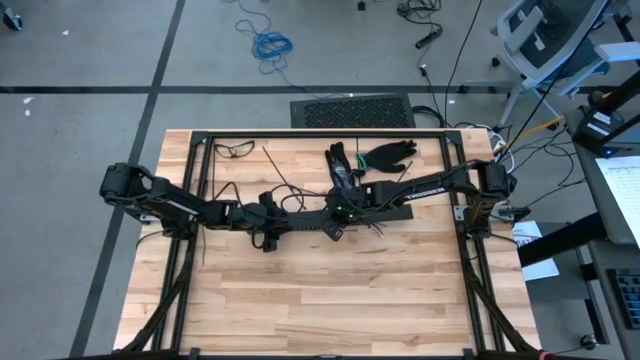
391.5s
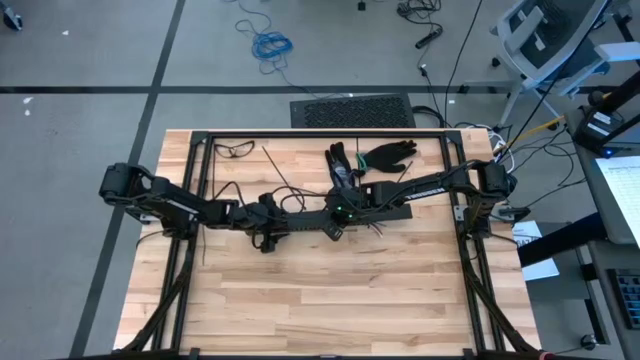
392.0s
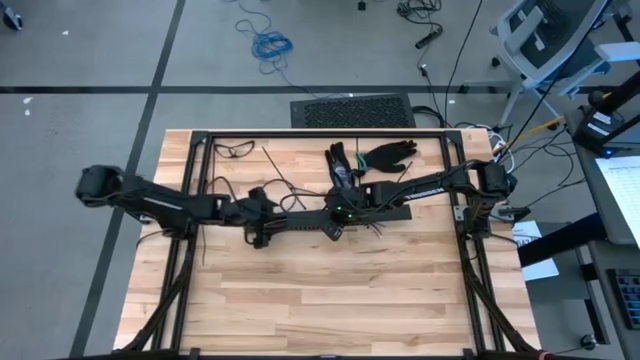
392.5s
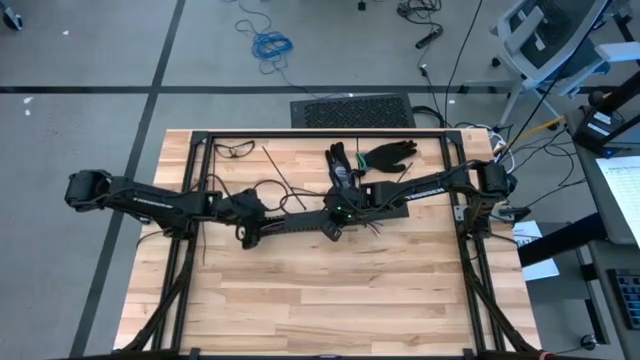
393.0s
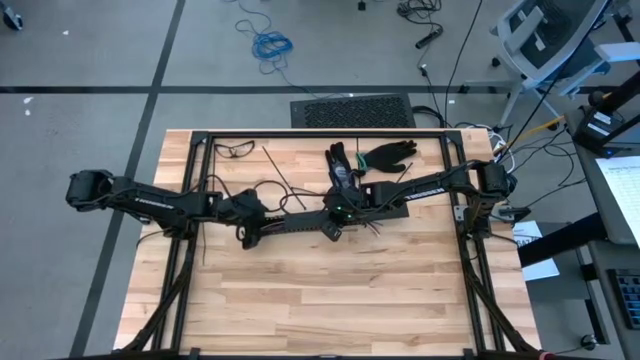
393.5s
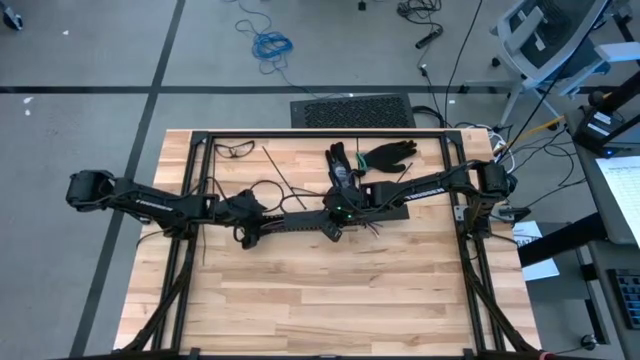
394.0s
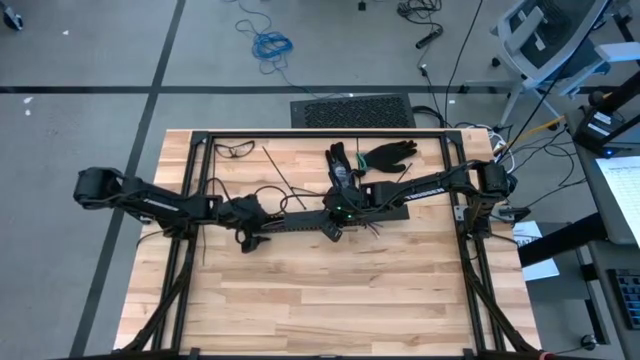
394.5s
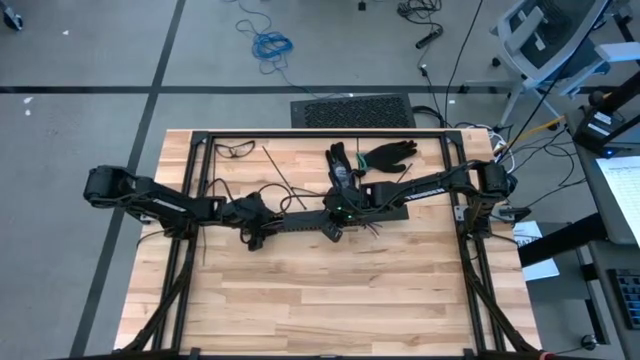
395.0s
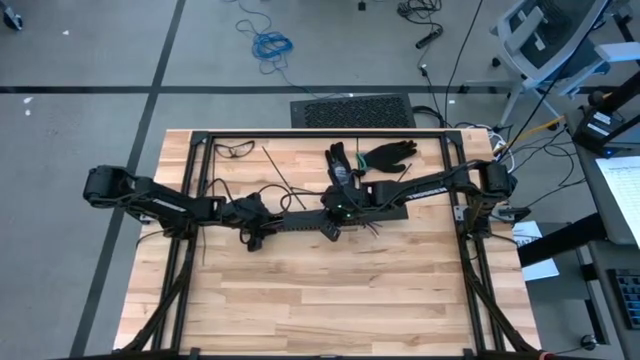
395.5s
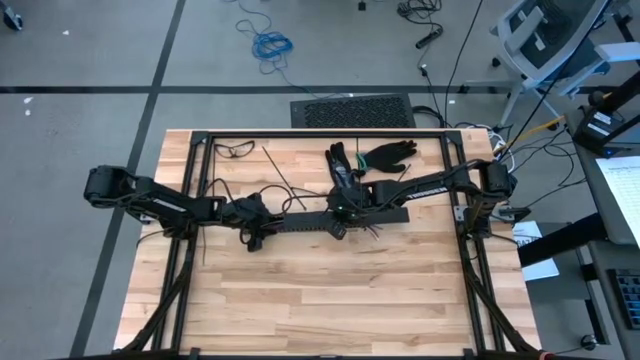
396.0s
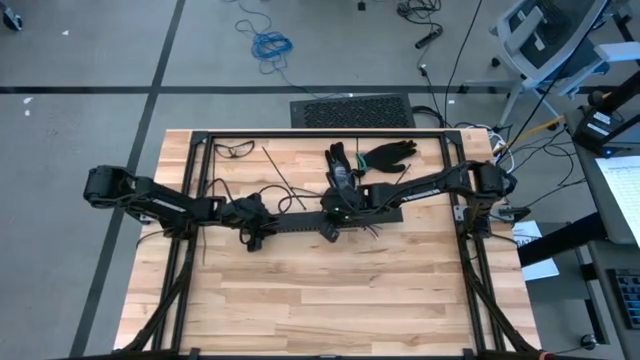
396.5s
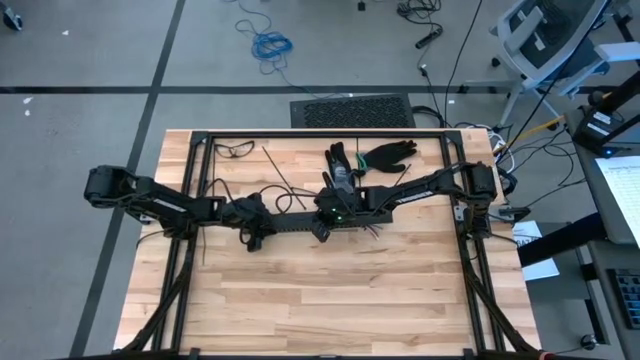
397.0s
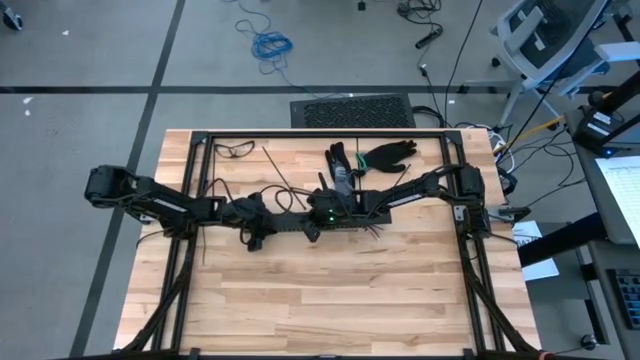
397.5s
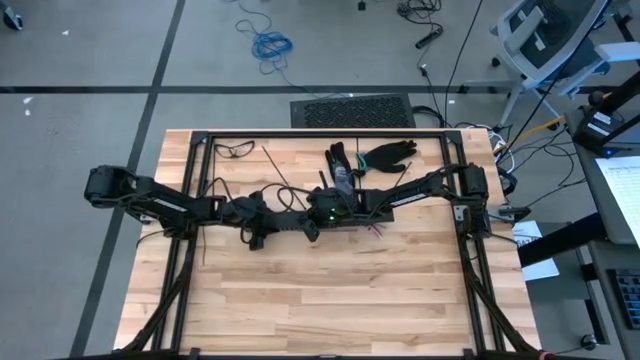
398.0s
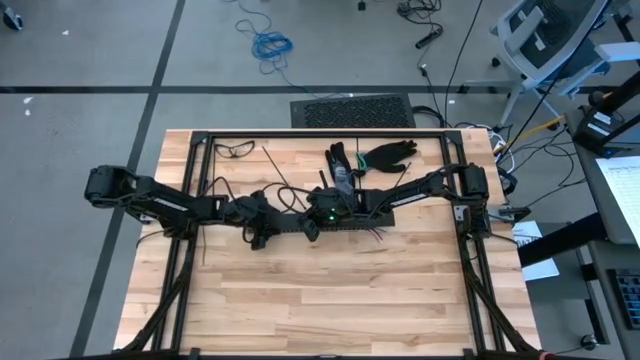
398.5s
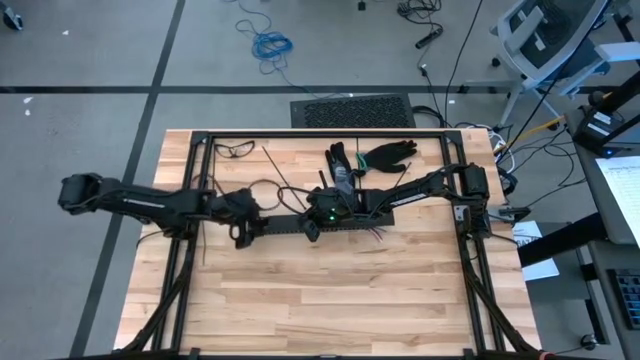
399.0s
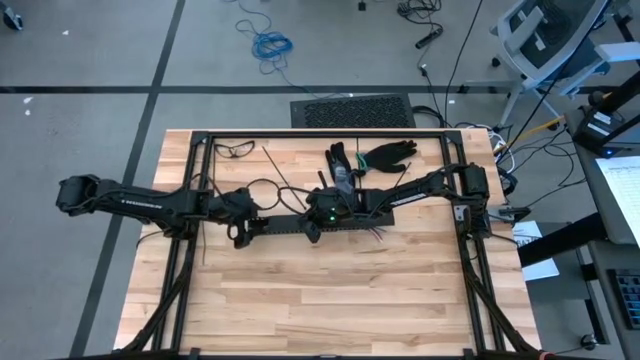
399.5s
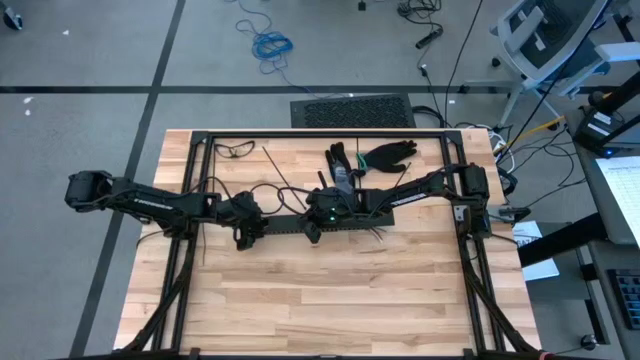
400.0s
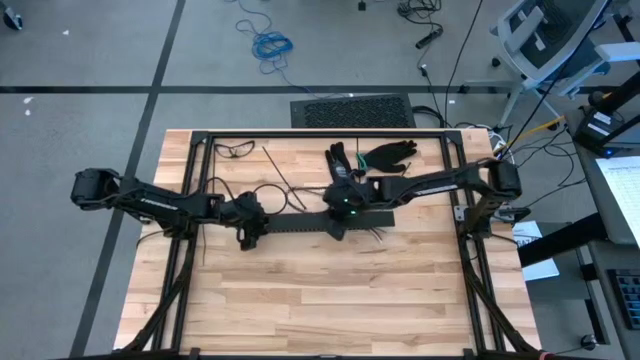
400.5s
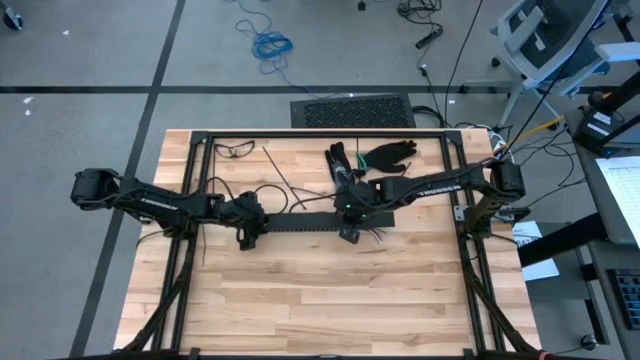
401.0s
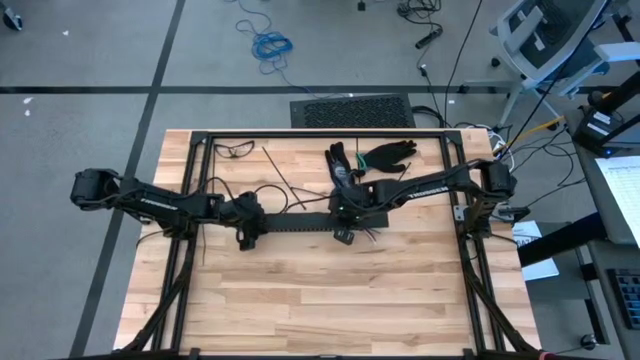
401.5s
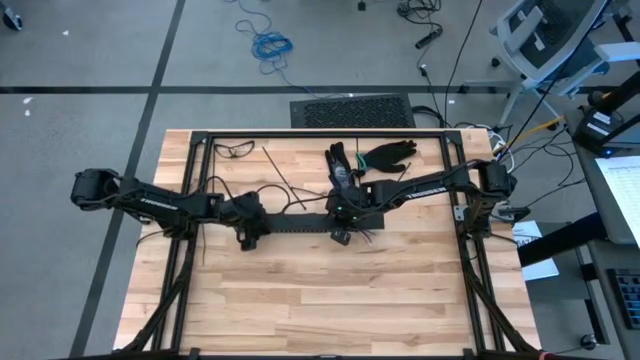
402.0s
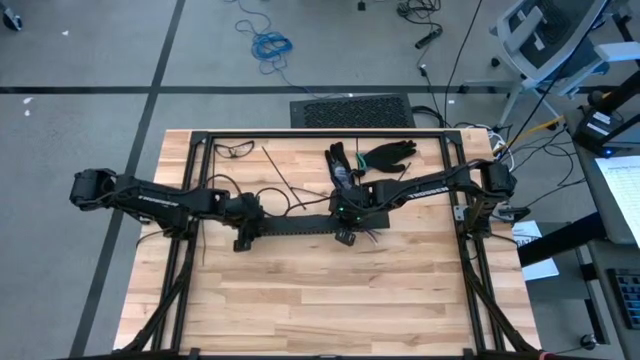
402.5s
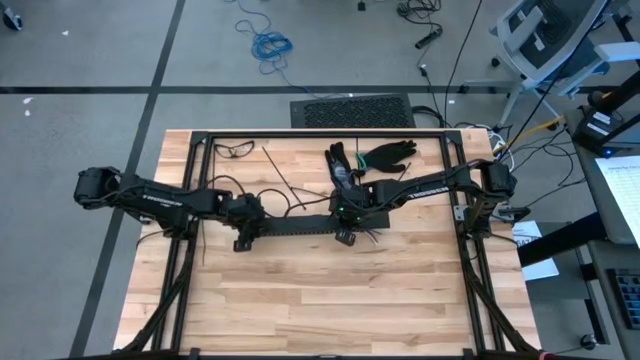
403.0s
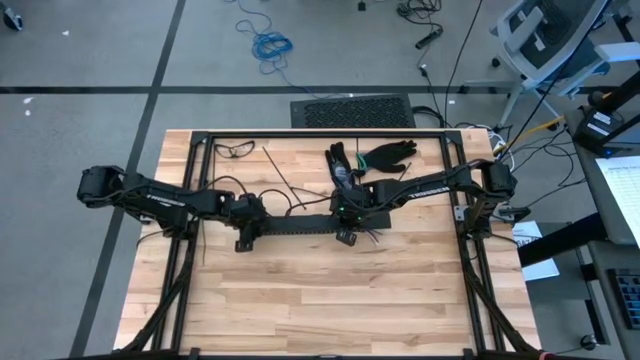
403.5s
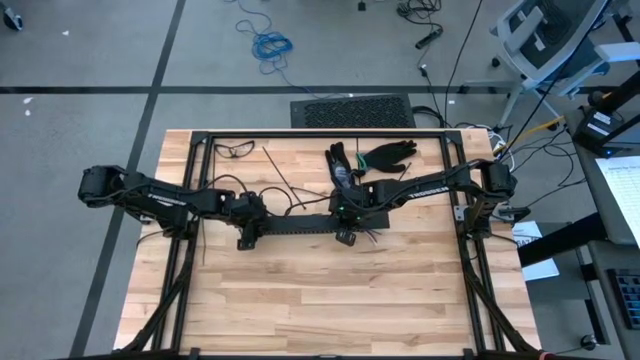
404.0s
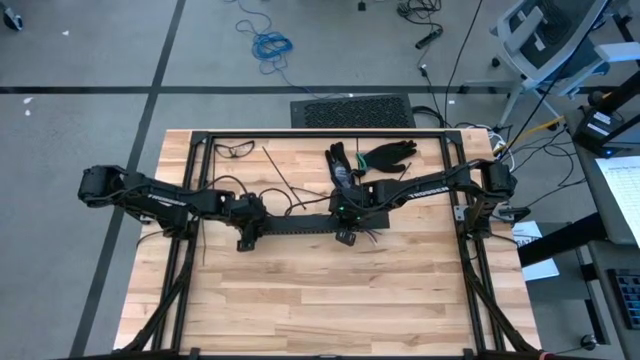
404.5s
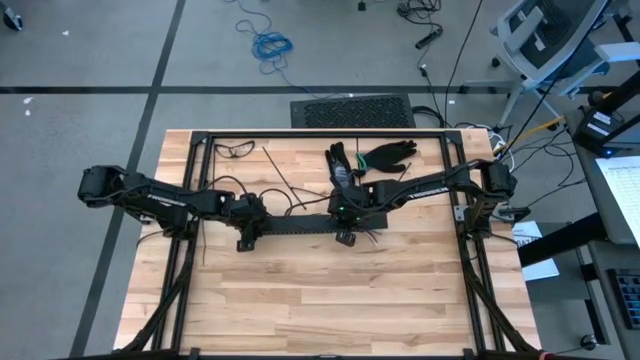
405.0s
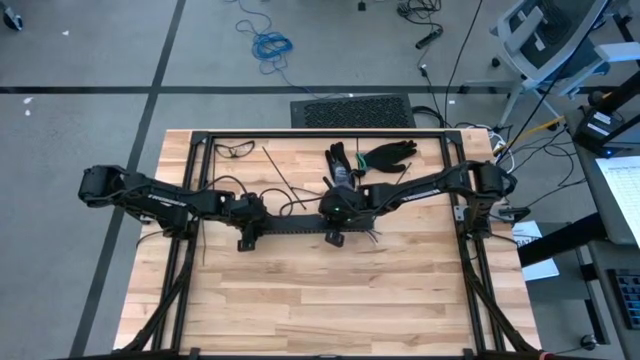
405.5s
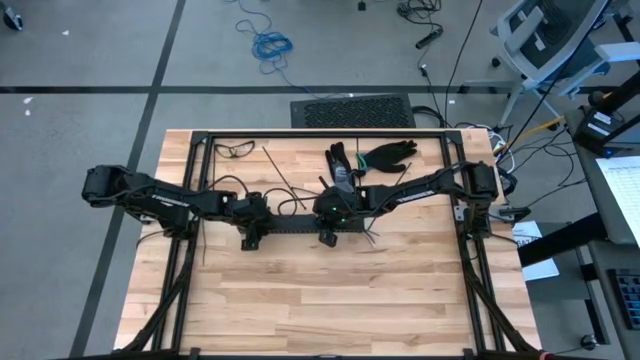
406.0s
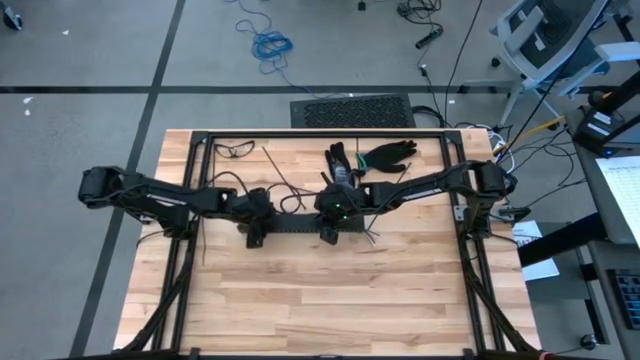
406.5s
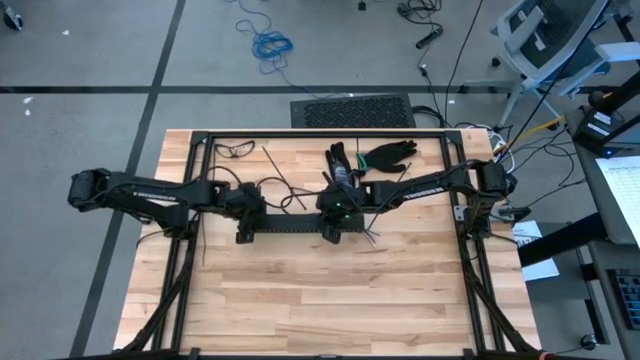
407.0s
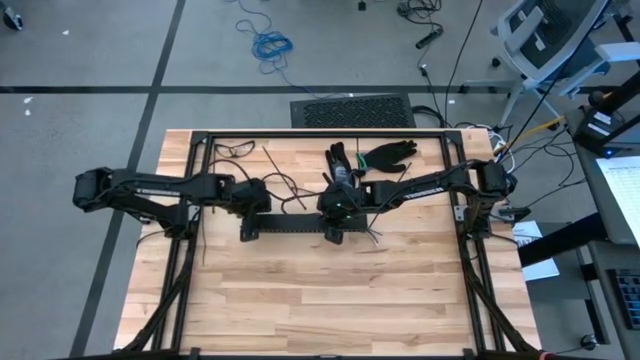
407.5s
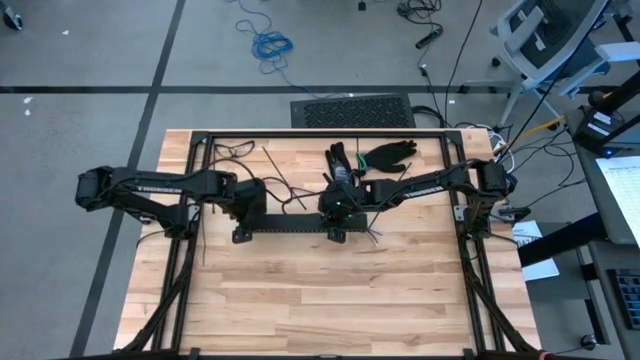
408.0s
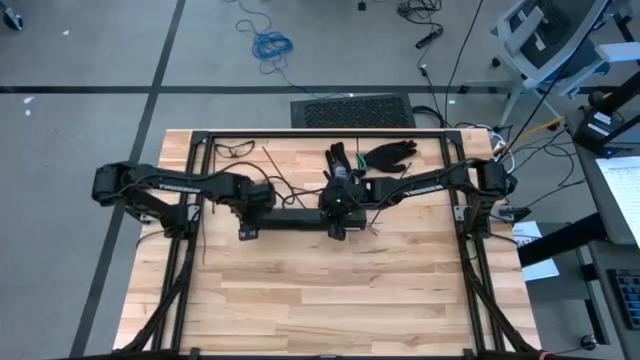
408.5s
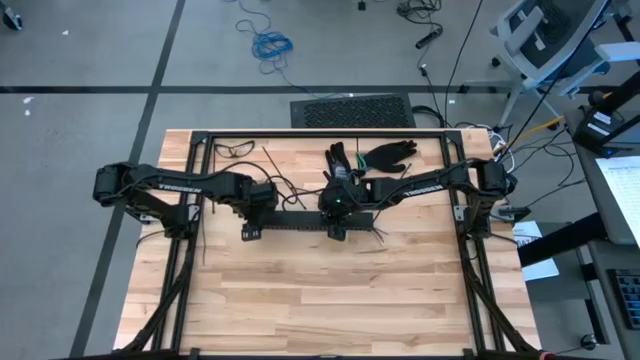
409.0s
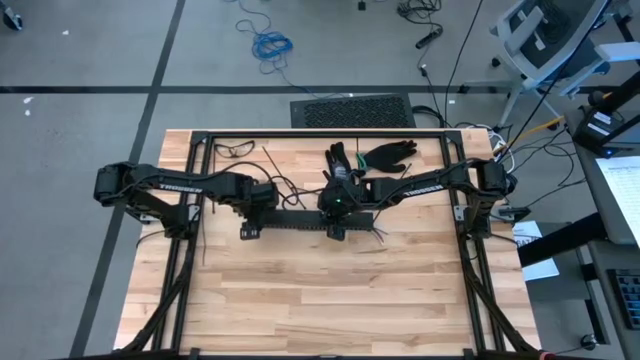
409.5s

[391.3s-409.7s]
Task: Ziptie cables
Close the black cable duct

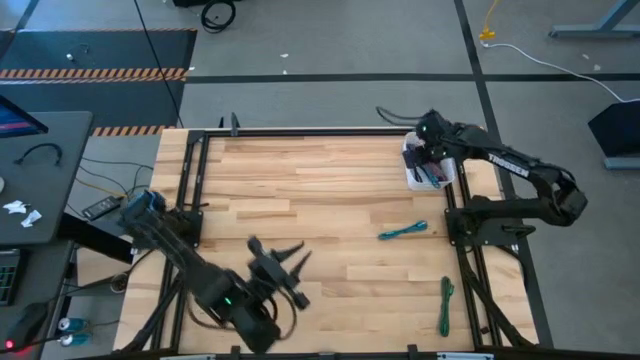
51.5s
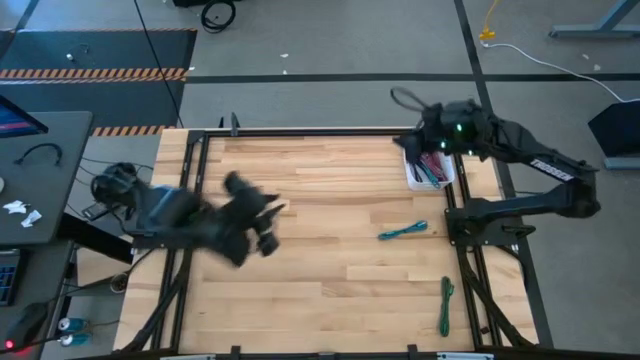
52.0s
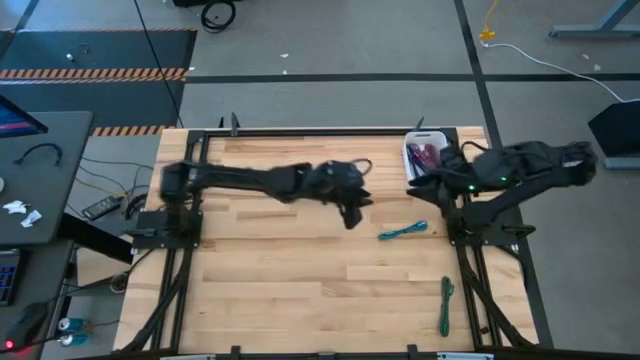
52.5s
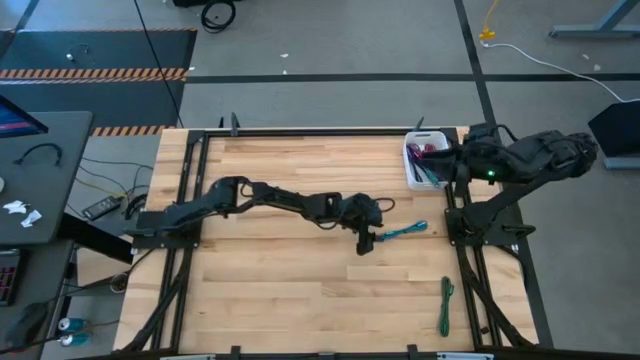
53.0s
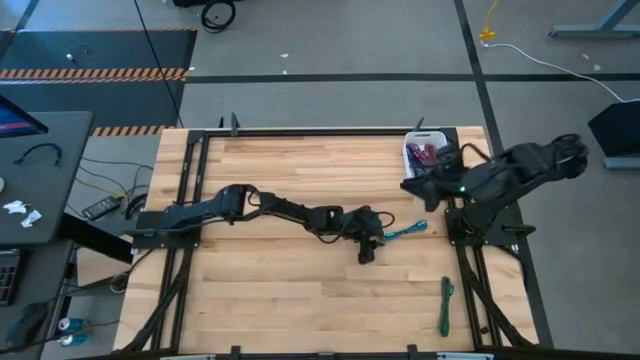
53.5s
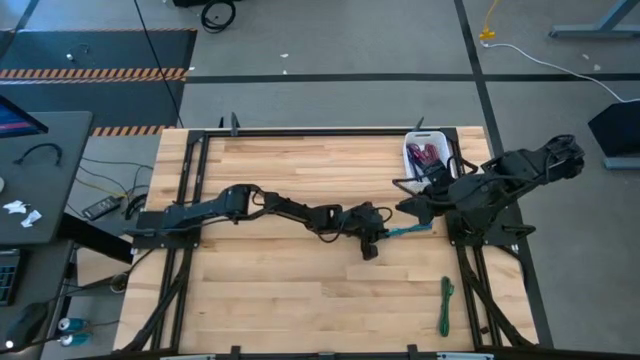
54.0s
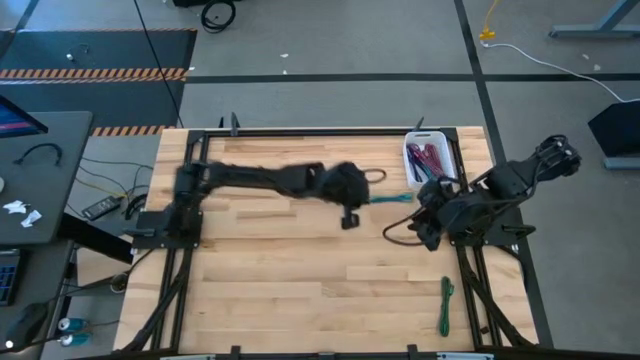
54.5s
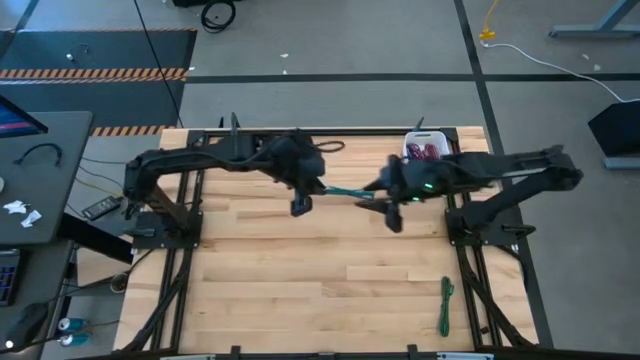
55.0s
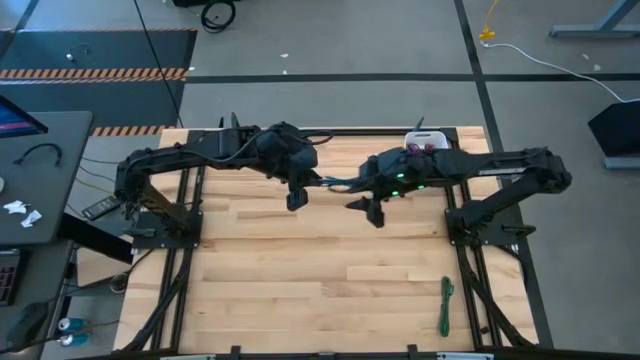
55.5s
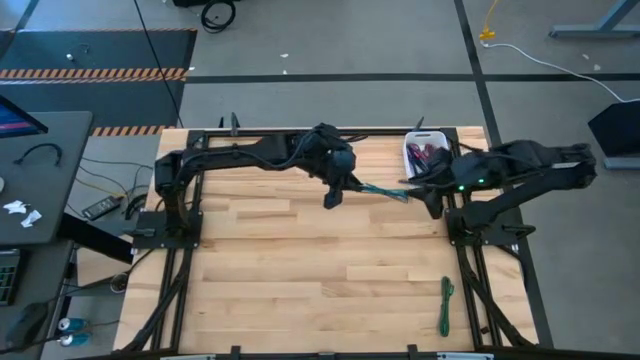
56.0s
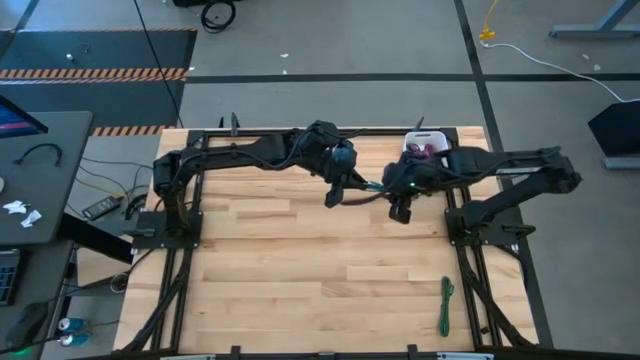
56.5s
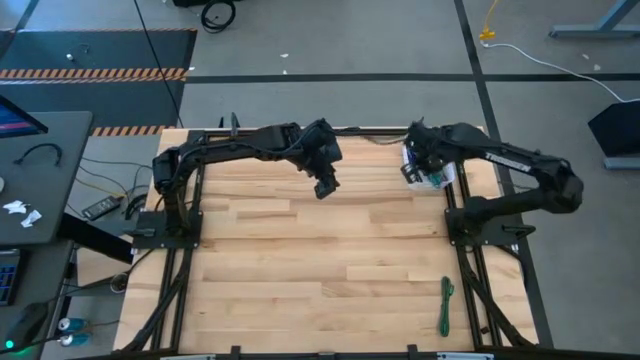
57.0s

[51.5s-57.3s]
Task: Pick and place USB-C Cables
Put the black blue charger cable into the bin
